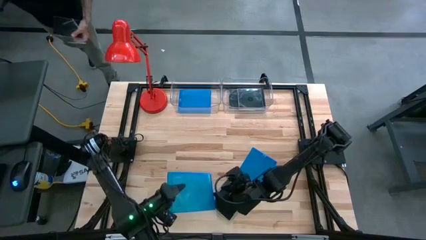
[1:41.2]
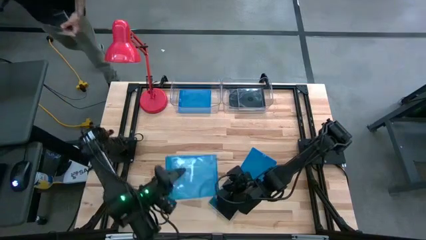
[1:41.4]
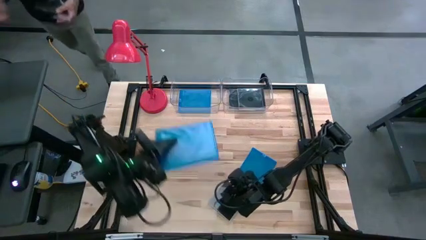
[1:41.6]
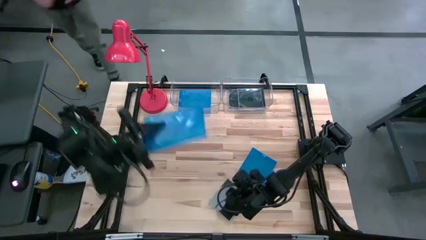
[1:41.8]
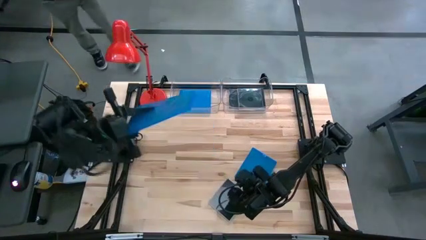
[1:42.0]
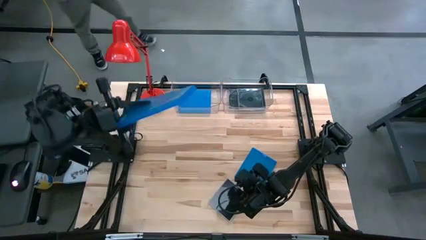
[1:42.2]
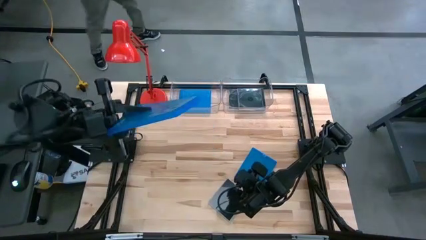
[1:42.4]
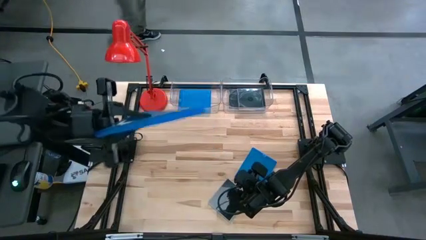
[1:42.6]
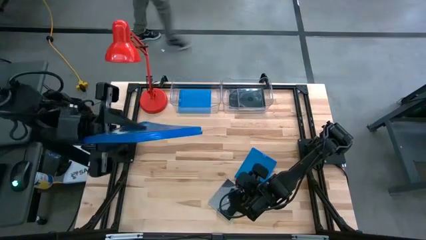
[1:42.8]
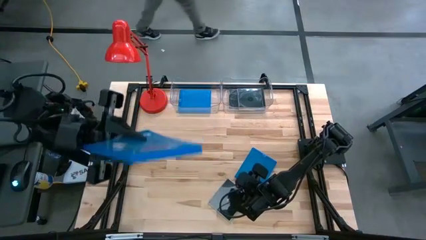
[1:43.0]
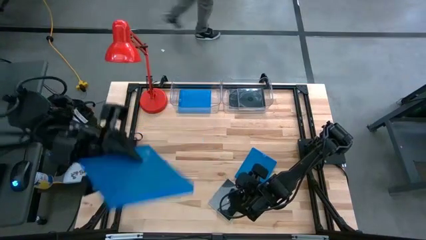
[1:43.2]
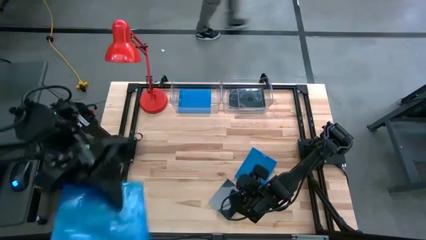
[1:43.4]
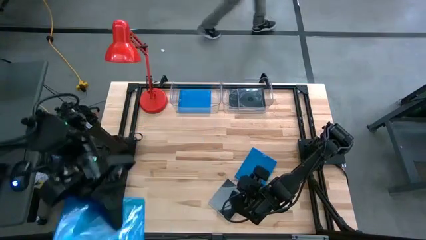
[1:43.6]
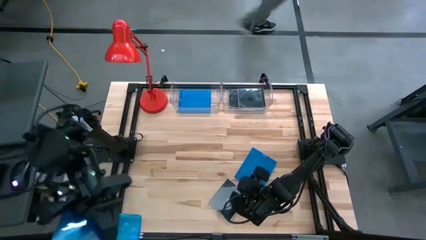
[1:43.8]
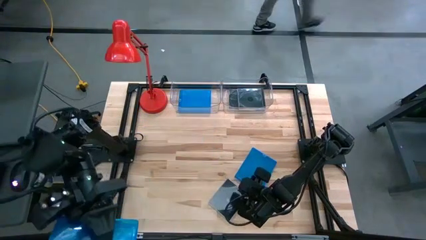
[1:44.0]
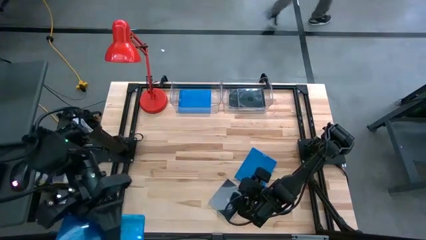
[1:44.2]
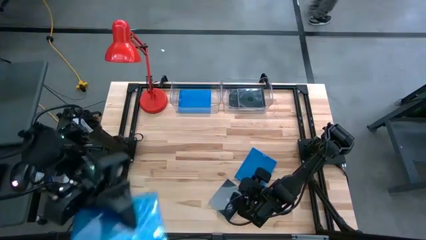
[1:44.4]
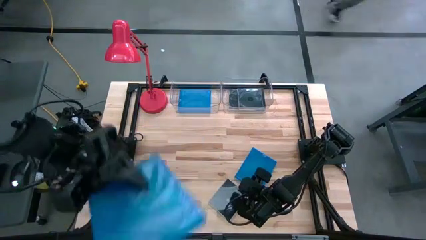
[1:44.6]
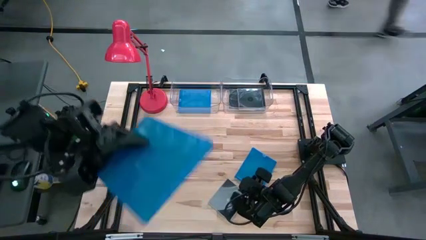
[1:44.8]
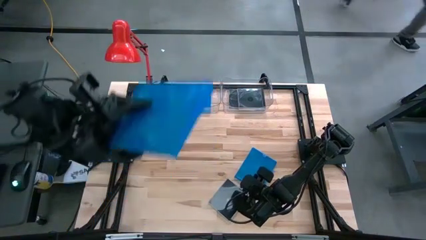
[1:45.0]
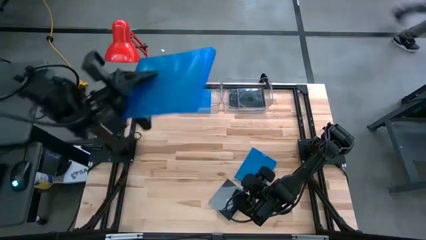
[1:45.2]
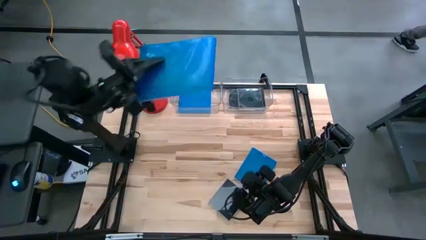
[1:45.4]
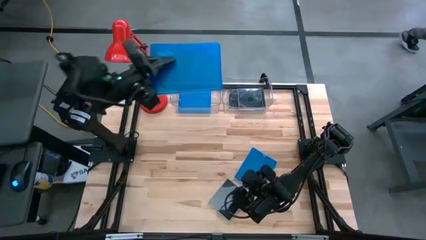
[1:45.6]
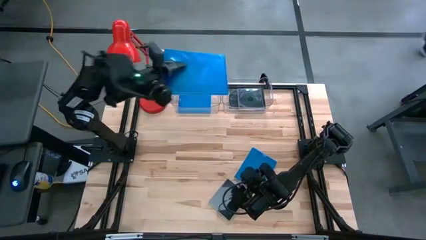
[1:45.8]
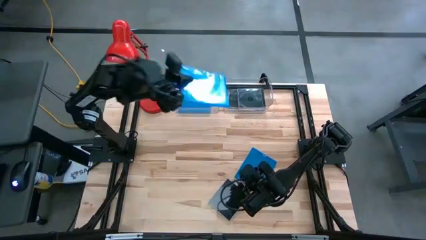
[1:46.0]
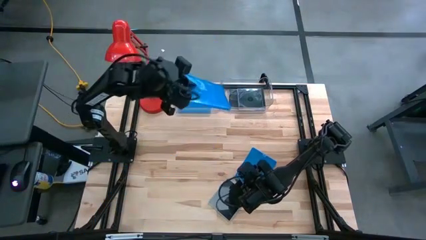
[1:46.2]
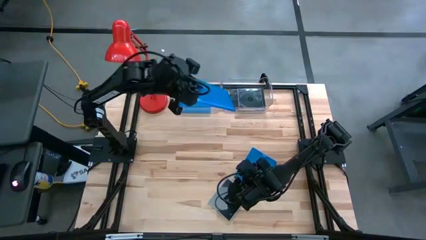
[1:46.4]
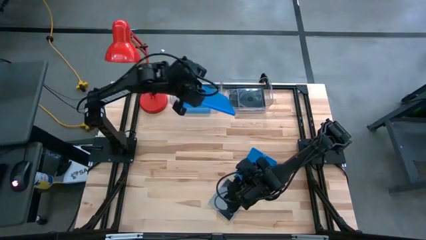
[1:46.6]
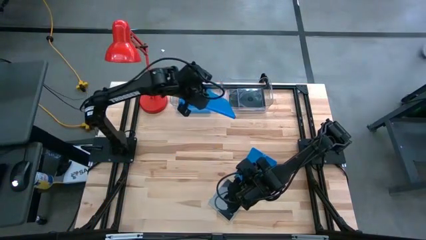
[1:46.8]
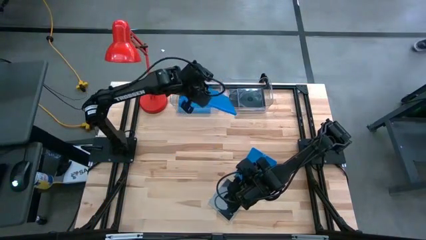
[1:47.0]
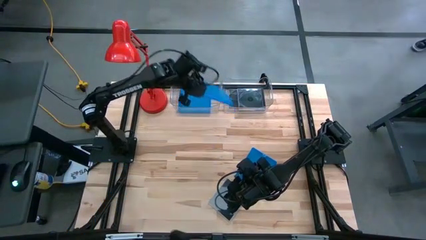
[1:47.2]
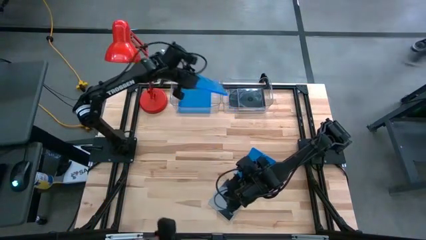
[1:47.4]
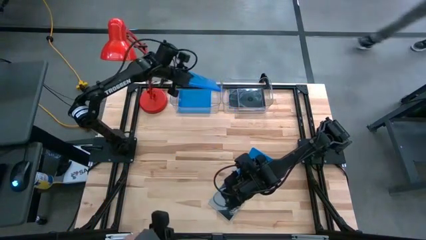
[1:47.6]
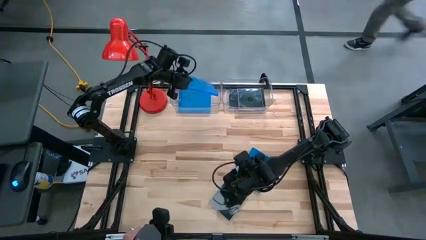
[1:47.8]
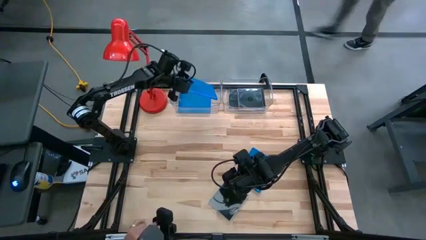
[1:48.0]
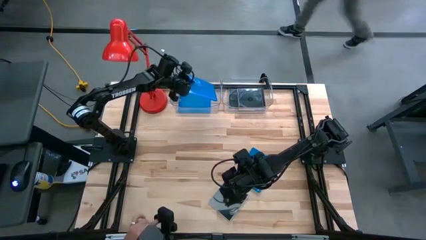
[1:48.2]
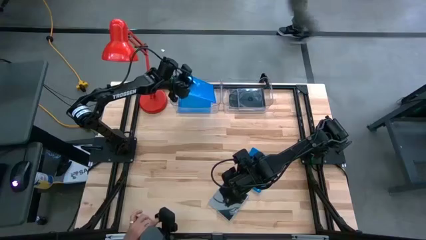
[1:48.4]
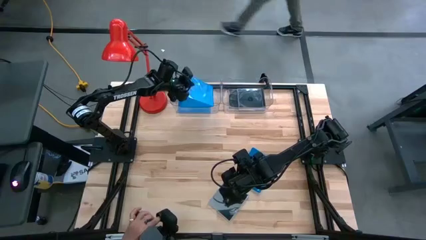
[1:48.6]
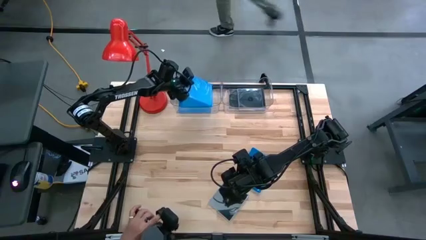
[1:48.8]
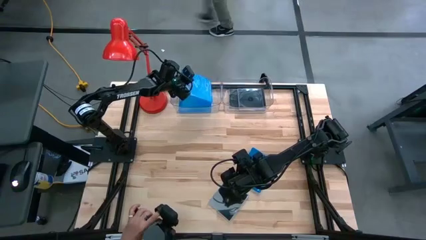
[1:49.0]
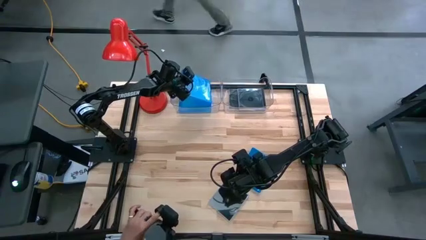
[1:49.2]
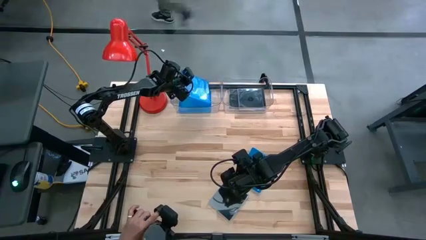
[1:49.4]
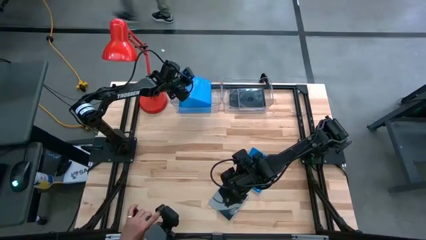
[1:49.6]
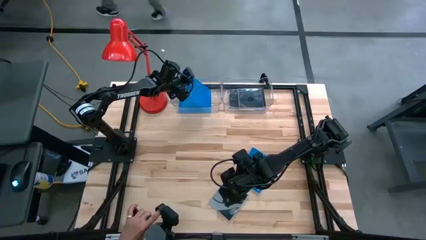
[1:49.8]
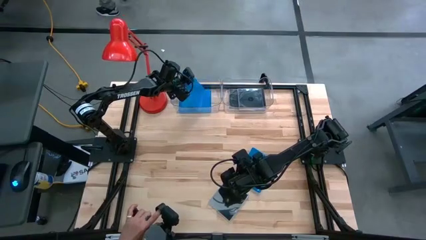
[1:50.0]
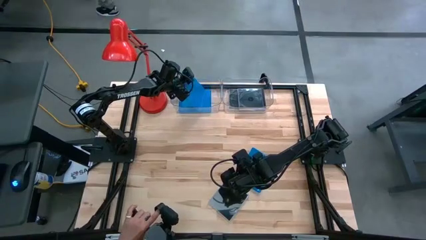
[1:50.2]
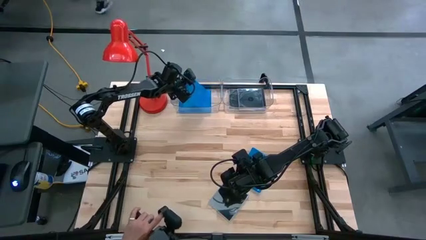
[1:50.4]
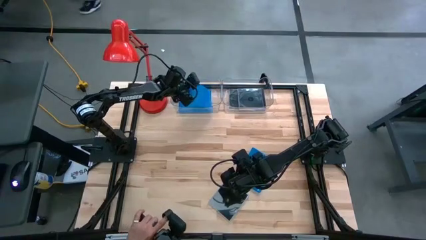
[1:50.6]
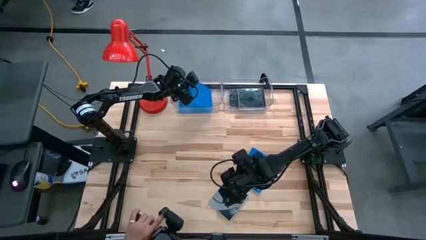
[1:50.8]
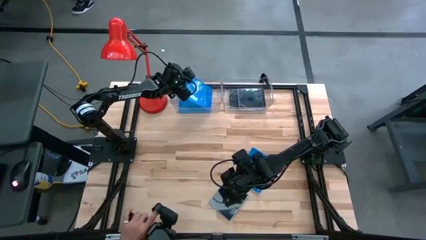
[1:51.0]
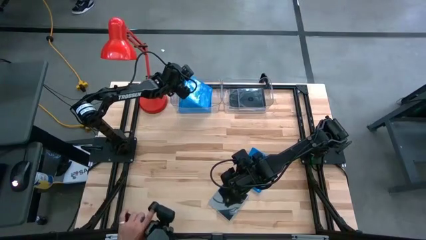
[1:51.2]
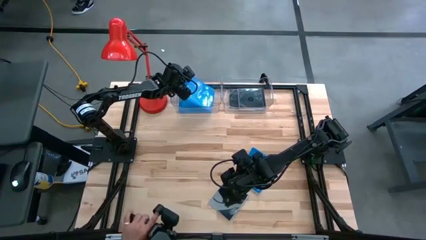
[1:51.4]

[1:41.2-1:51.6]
Task: Pick & place jewel cases by type
Put the left blue cd case into the left transparent bin

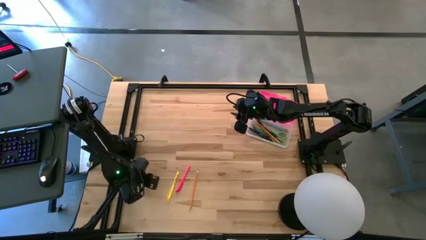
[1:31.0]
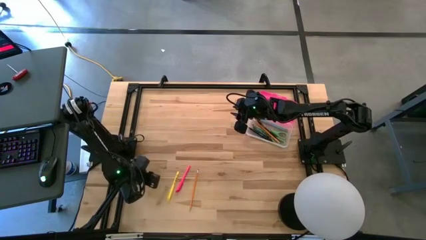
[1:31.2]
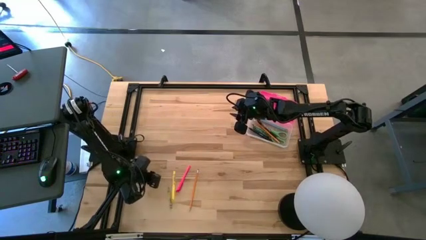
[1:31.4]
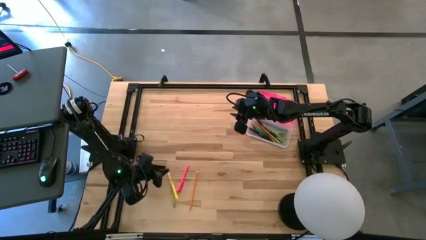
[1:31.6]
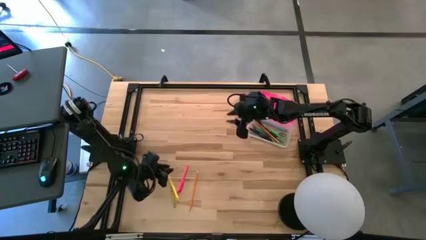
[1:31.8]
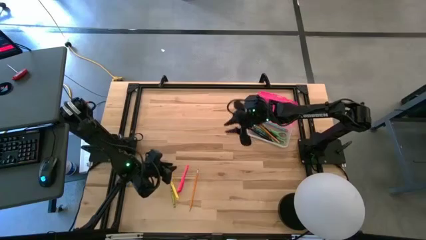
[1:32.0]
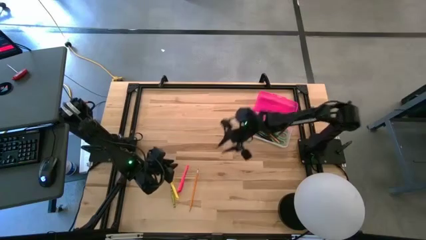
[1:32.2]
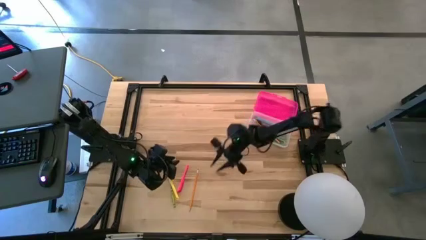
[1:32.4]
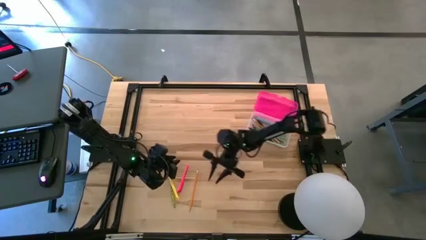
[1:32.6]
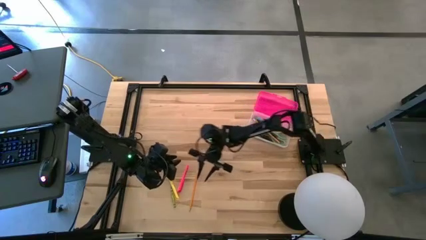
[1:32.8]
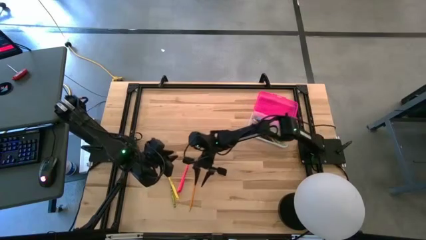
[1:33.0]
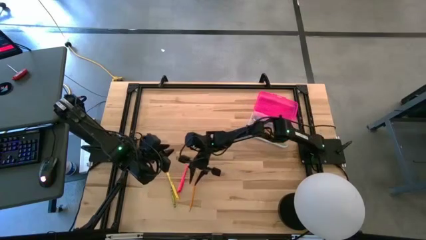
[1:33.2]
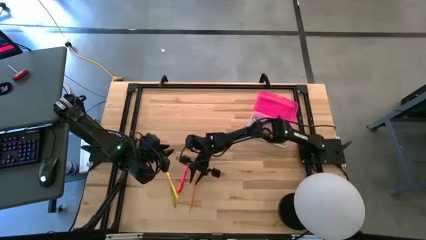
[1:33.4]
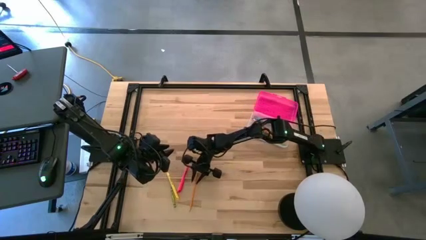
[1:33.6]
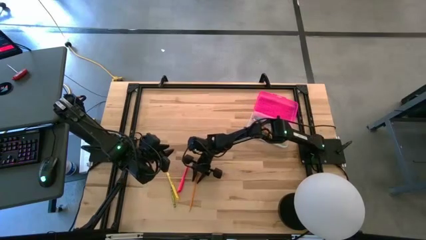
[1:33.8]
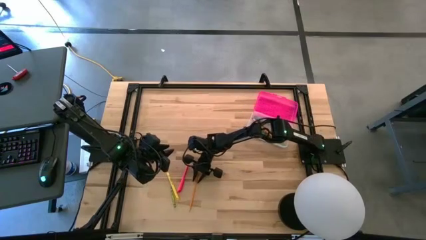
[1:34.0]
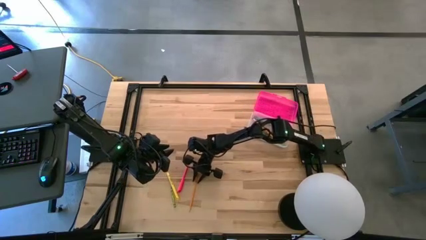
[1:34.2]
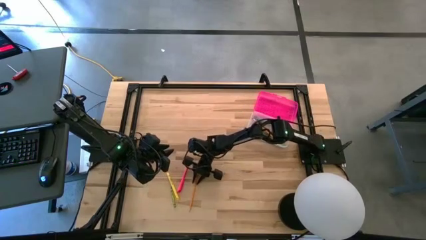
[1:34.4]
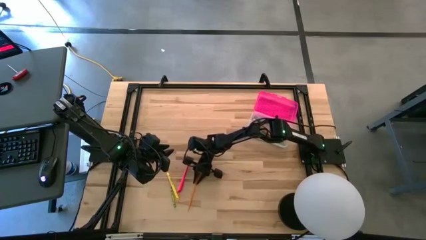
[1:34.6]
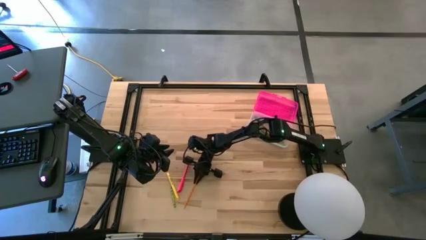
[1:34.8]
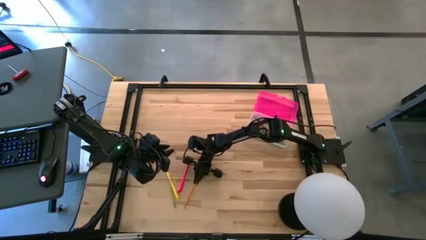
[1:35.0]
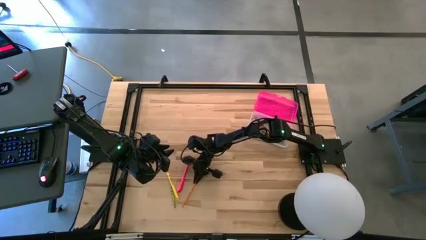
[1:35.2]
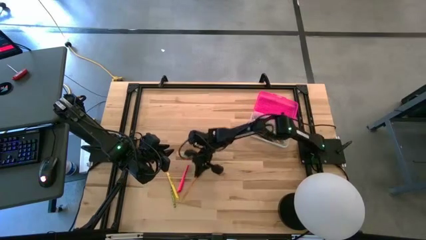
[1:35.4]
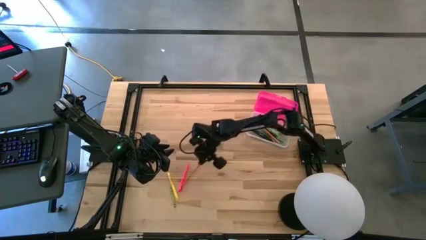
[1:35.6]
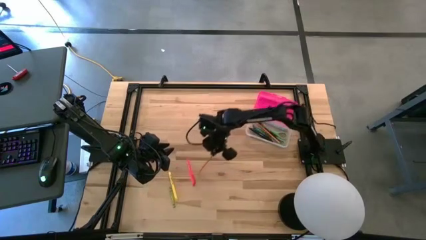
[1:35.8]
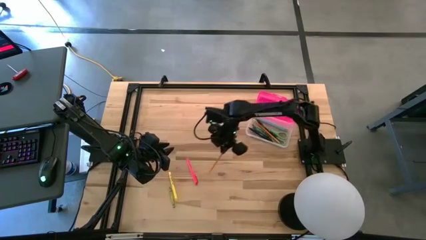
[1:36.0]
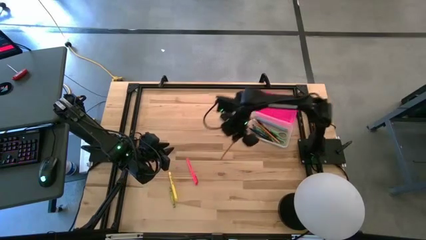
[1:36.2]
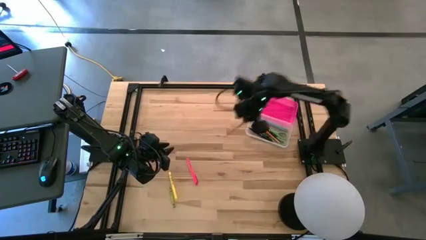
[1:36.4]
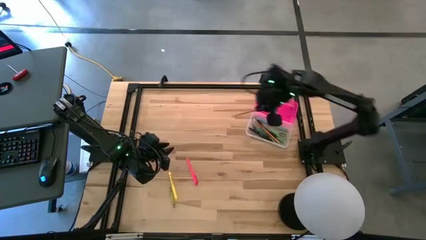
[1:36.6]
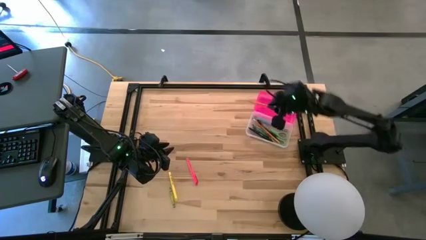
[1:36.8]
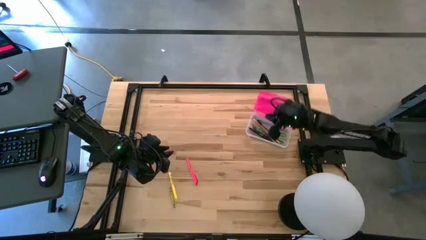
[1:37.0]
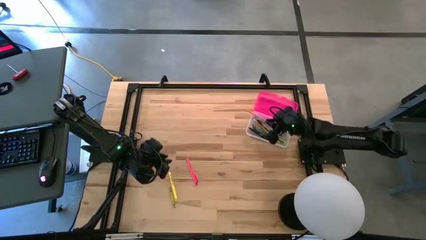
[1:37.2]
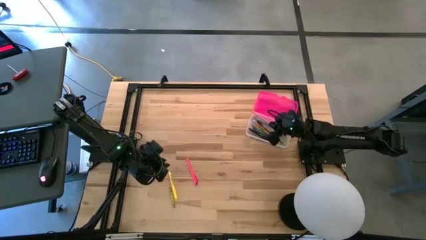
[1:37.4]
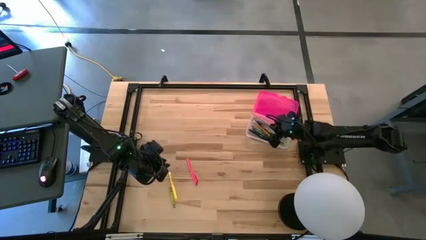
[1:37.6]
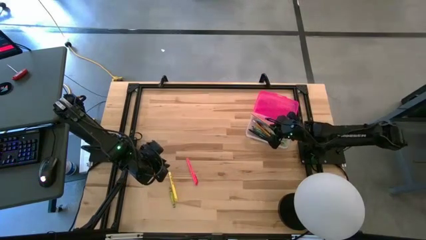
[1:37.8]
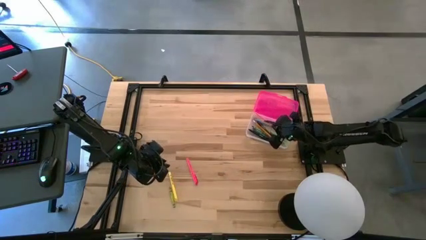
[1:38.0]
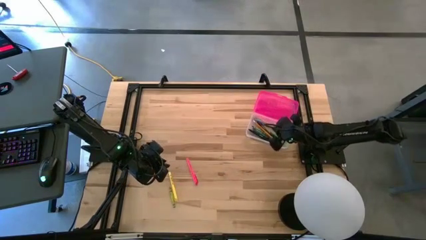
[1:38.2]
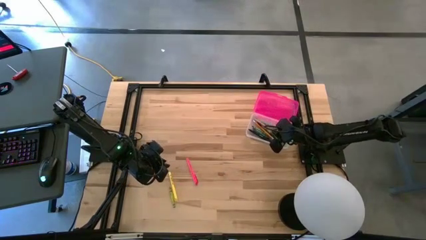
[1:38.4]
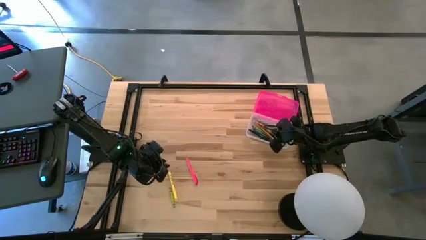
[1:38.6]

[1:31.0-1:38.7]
Task: Pick & place school supplies into a supply box
Put the orange pencil into the pink supply box
